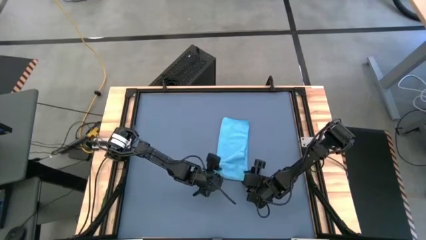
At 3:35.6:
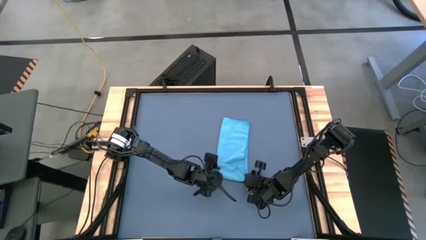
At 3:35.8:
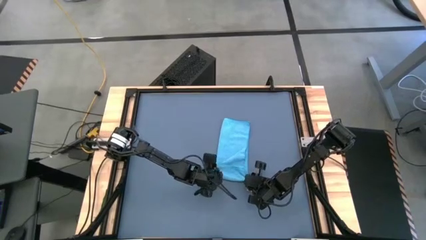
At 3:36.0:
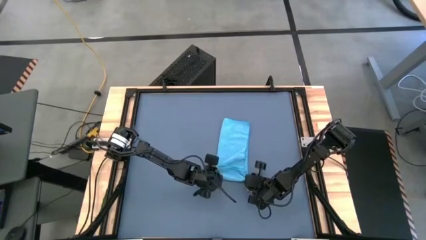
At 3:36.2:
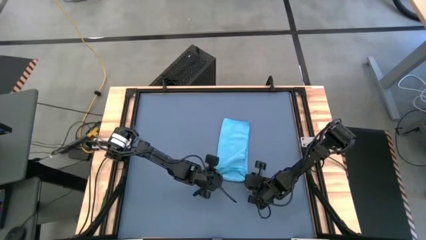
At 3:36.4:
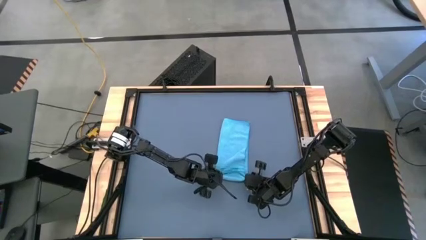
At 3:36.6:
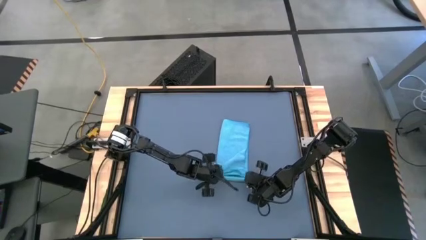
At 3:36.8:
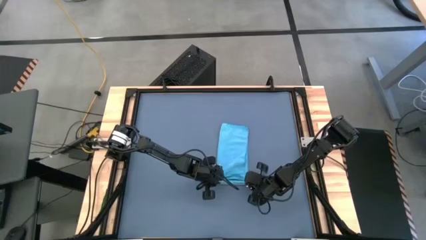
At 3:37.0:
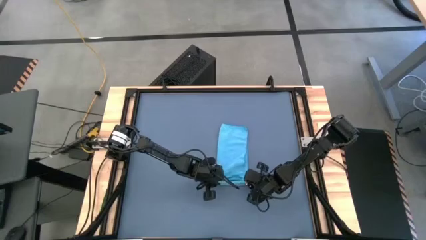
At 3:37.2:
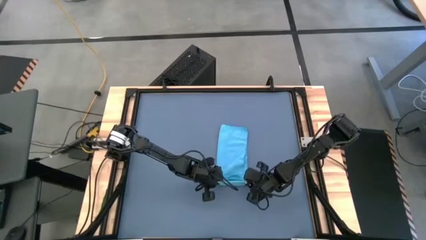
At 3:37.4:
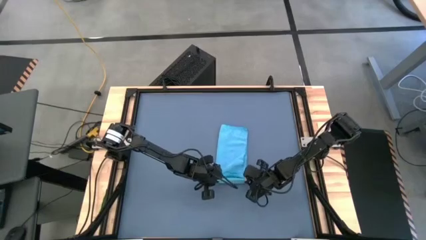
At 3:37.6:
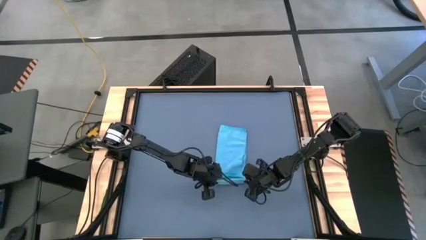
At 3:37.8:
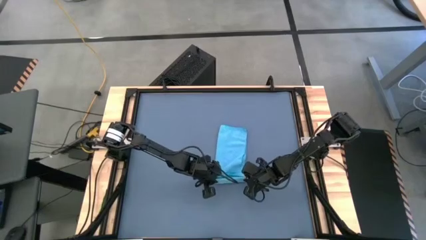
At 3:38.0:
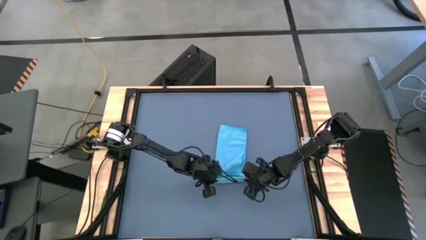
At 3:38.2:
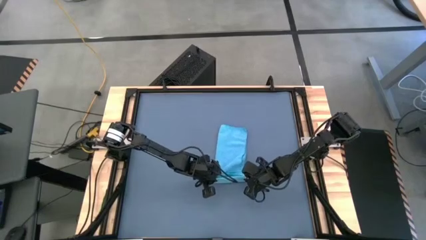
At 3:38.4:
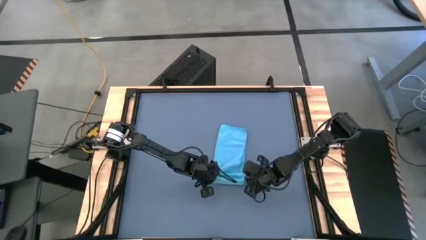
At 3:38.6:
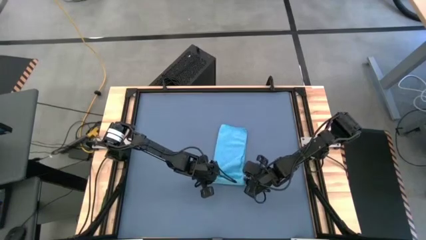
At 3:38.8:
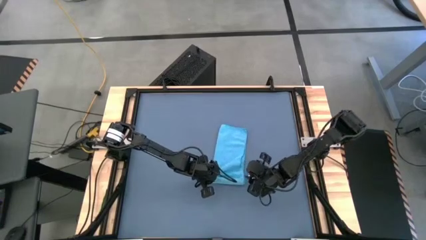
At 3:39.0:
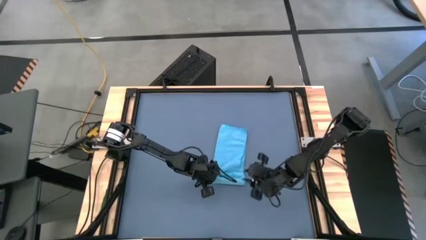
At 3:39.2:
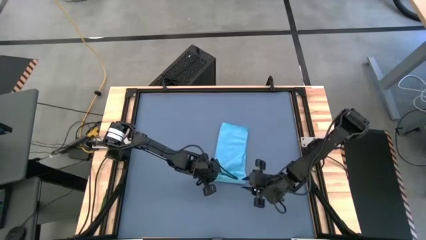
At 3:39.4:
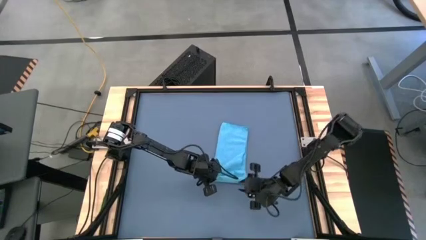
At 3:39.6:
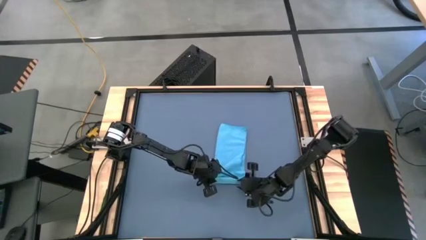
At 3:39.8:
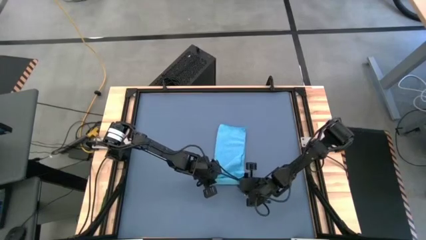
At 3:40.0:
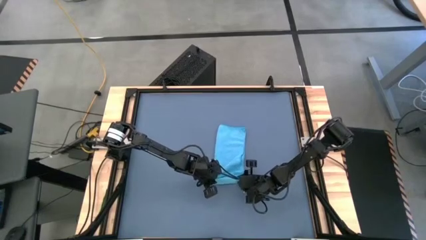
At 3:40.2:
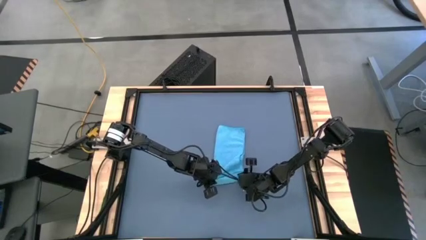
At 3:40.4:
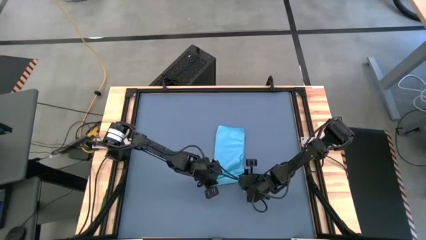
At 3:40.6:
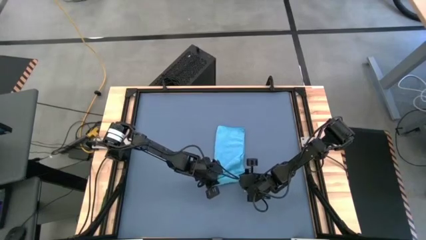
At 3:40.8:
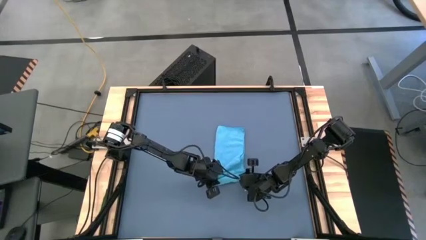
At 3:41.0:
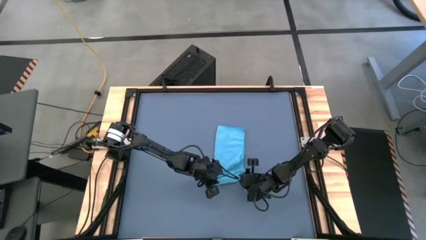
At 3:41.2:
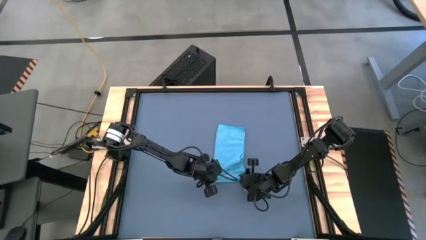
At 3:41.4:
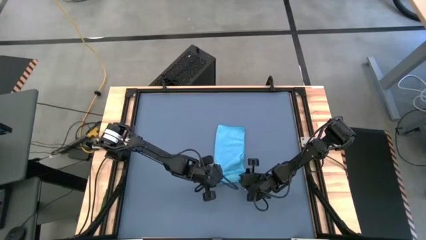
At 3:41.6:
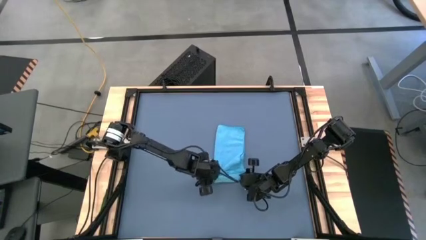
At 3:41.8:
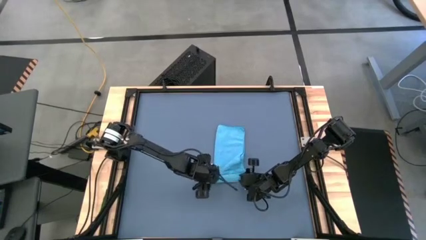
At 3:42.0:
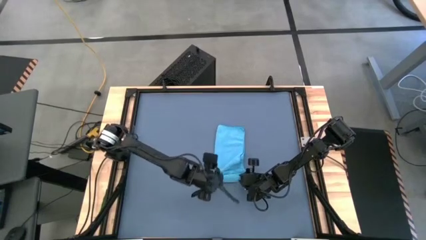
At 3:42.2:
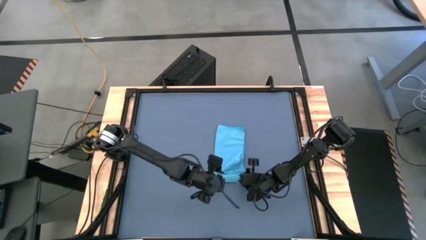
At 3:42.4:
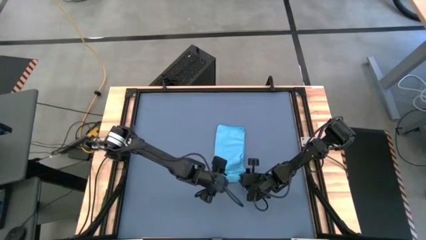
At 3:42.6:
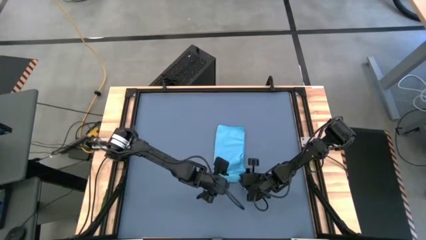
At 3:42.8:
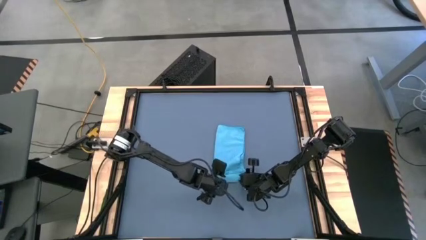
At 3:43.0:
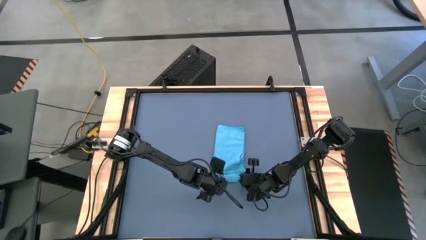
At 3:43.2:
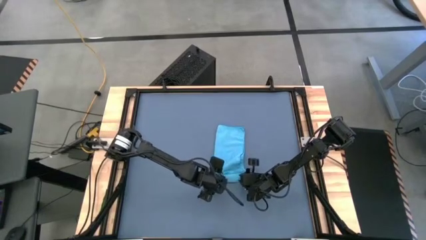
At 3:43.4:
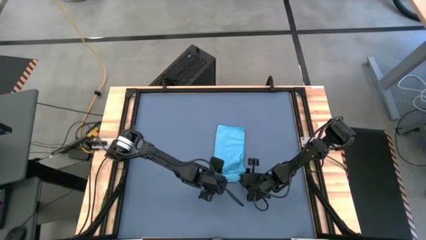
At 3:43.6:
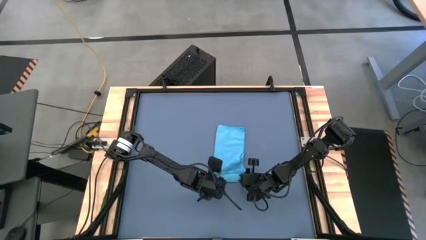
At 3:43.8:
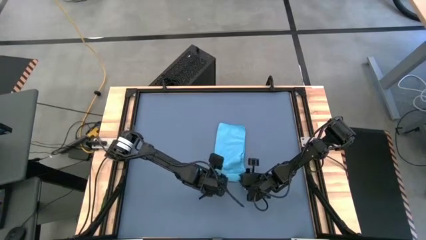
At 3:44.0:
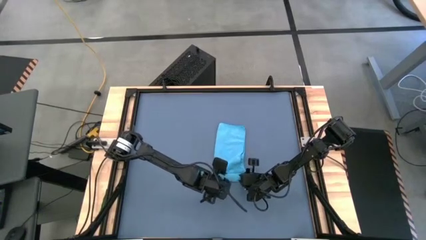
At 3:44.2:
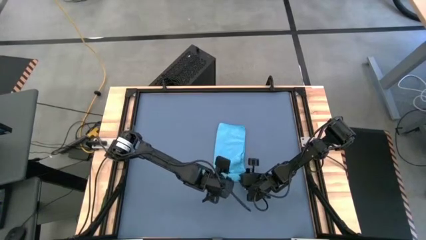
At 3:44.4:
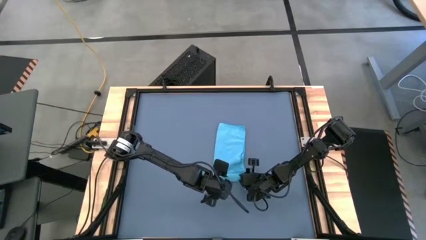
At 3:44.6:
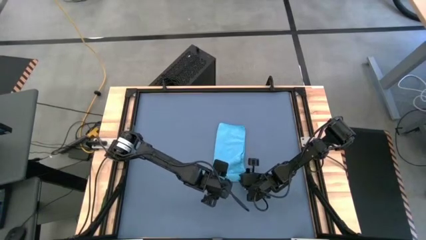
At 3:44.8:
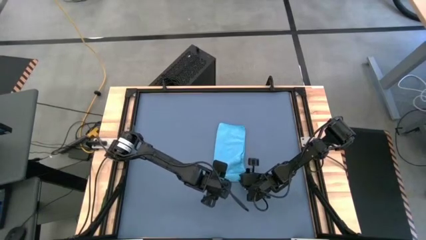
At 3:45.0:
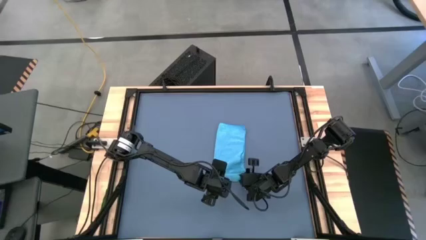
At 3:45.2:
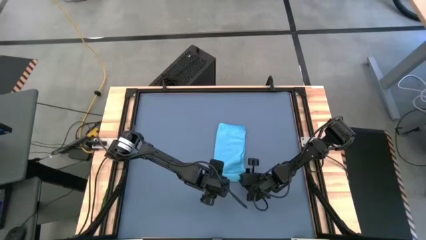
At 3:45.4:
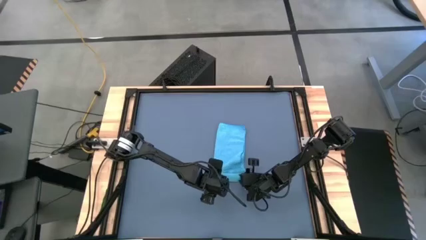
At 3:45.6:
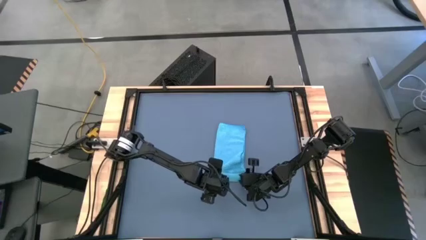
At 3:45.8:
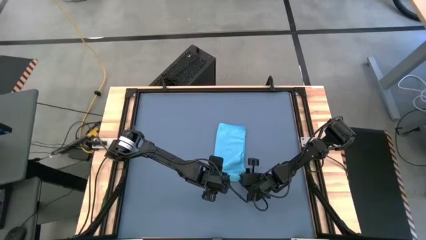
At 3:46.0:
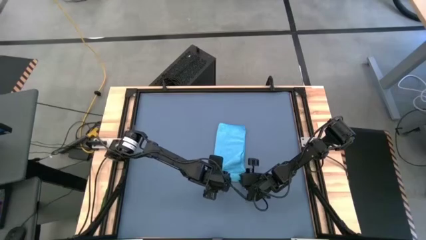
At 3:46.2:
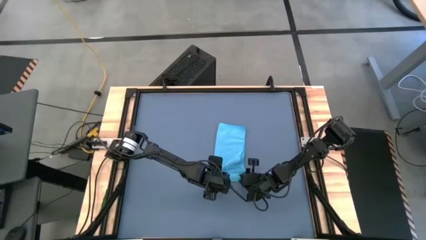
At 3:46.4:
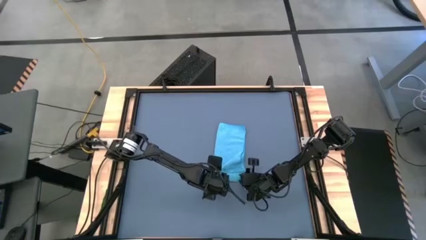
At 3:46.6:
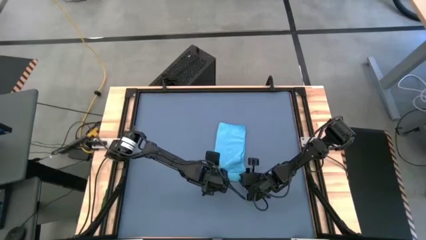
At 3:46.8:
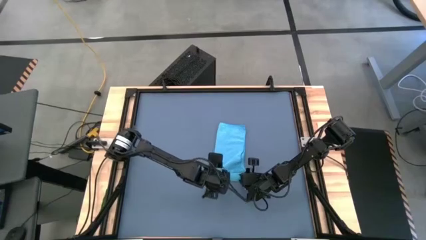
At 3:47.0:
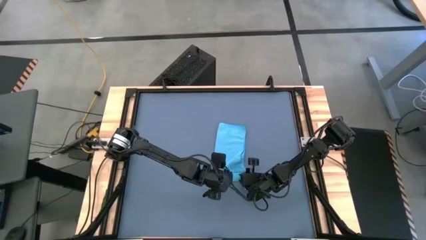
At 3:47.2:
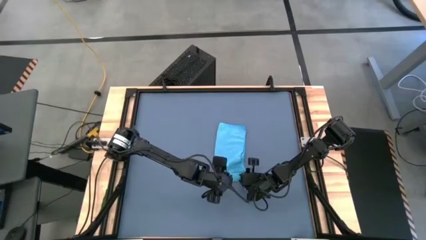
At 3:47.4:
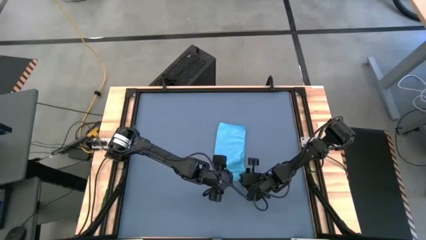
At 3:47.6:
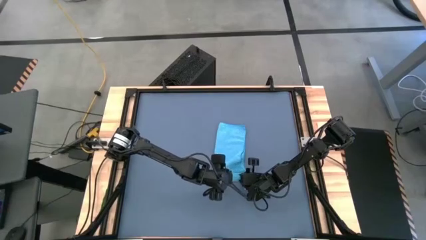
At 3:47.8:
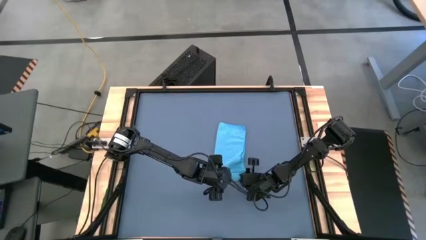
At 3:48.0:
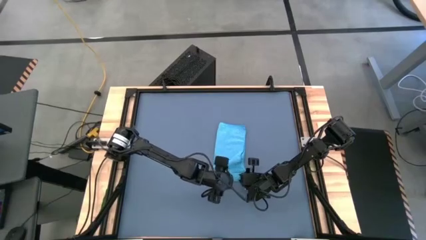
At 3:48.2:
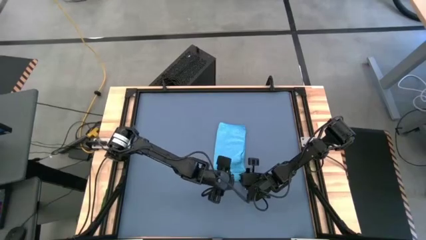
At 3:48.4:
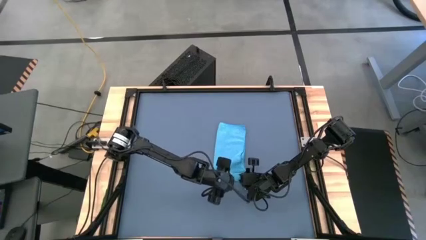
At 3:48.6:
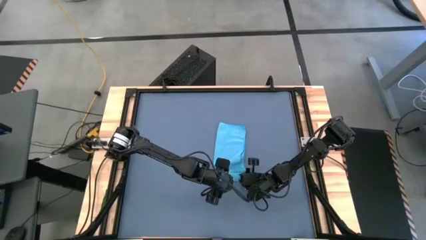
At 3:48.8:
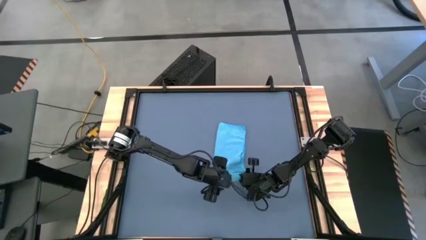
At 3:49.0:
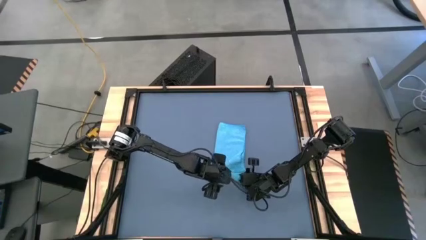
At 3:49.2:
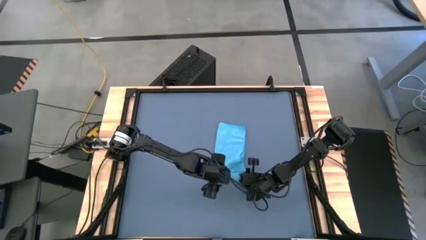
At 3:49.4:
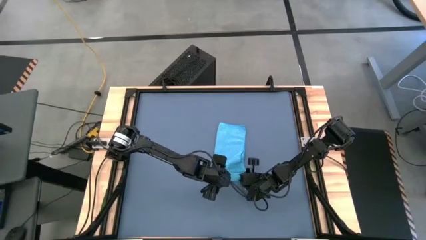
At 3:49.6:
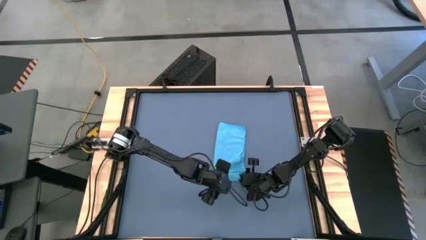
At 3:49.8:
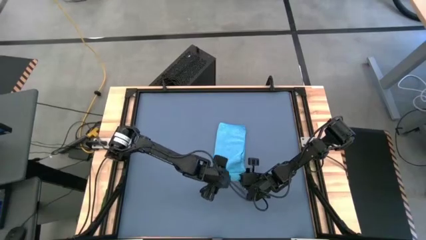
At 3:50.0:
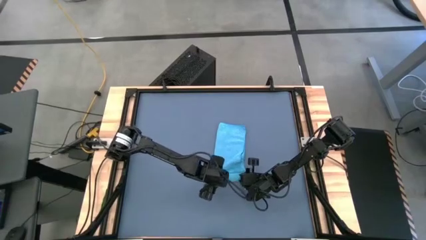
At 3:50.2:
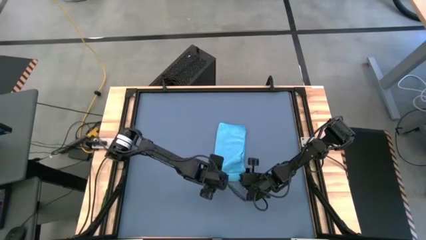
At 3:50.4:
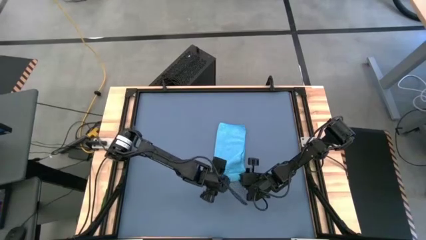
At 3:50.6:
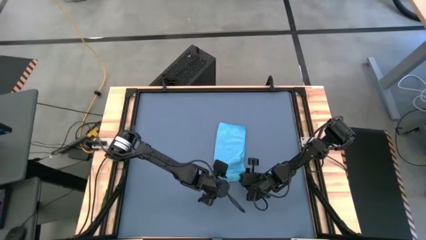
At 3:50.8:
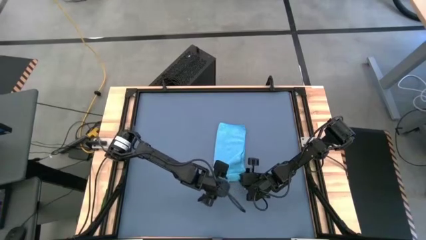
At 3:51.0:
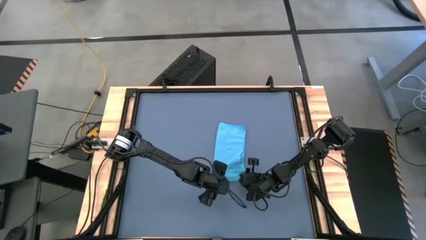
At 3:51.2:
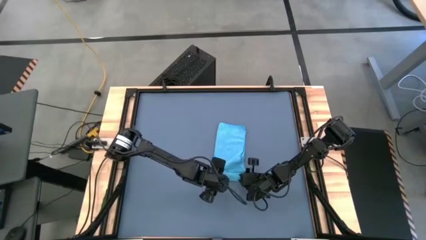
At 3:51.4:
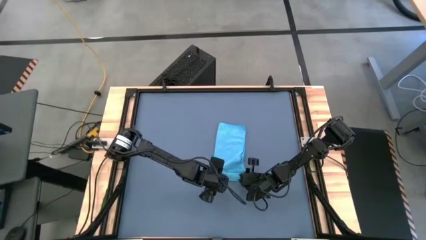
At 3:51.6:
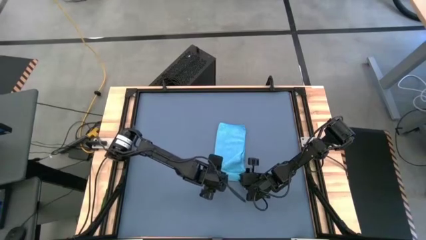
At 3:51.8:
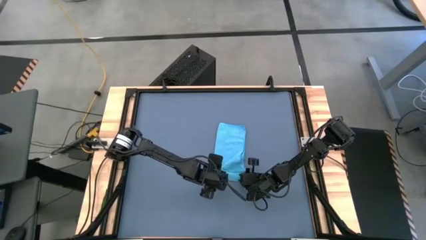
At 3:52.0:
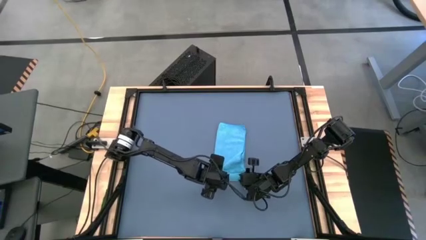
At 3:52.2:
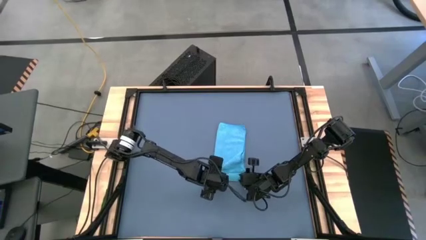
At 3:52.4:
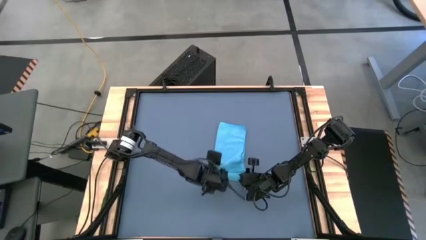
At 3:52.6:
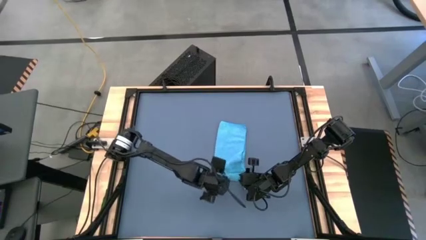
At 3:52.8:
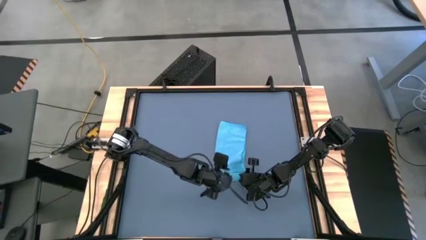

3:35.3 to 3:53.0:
Task: Roll towel
Roll the blue microfiber towel
